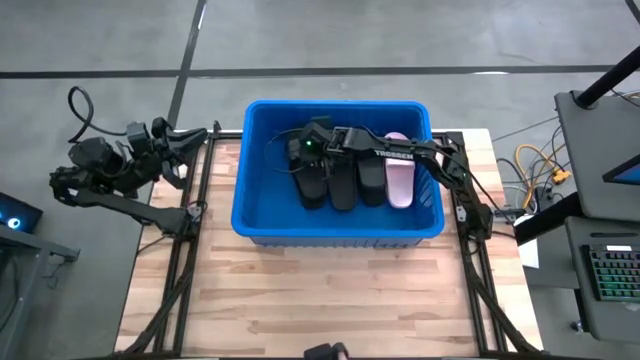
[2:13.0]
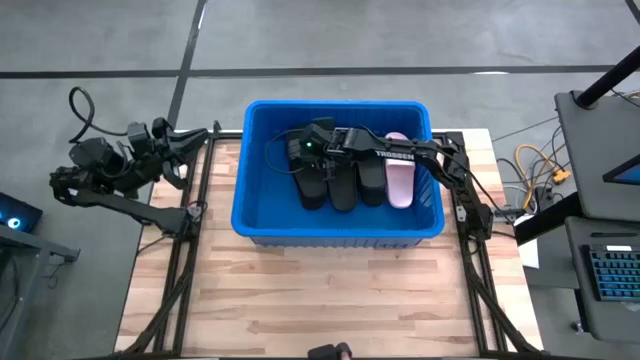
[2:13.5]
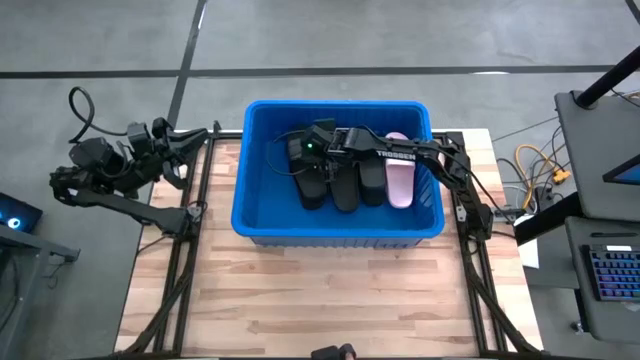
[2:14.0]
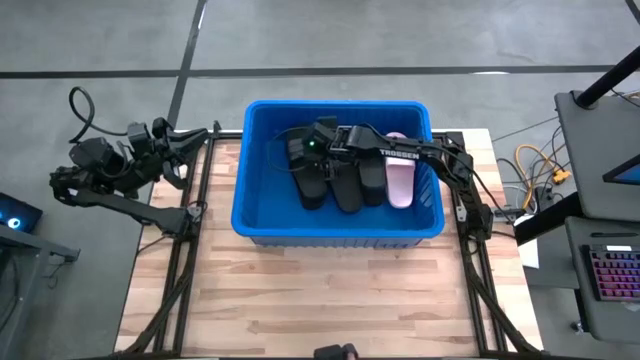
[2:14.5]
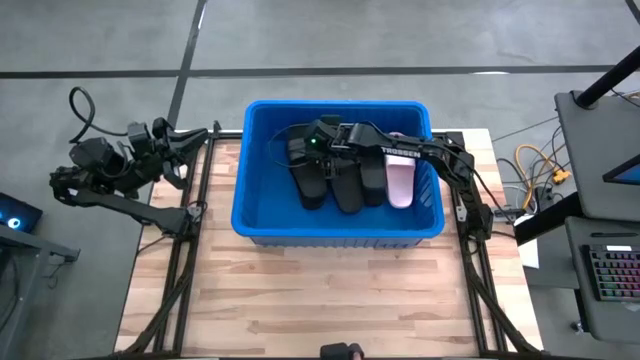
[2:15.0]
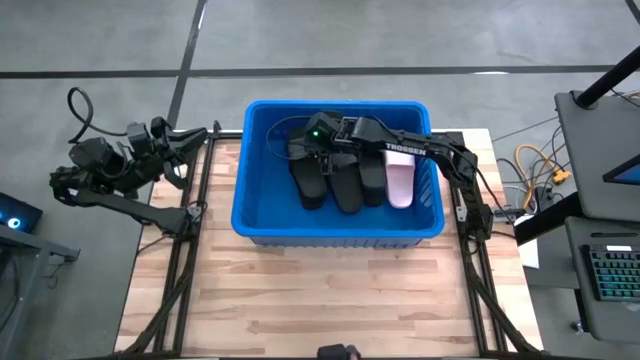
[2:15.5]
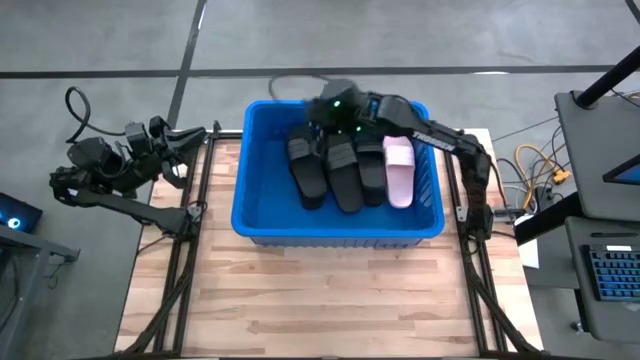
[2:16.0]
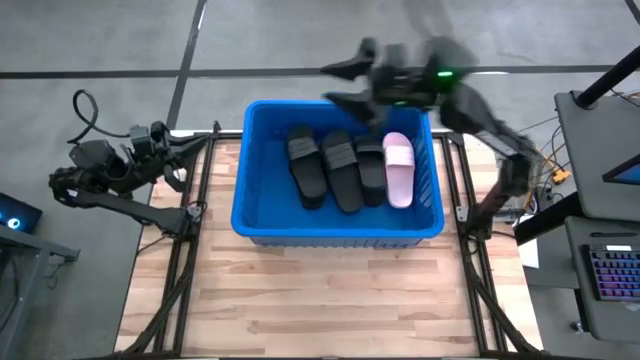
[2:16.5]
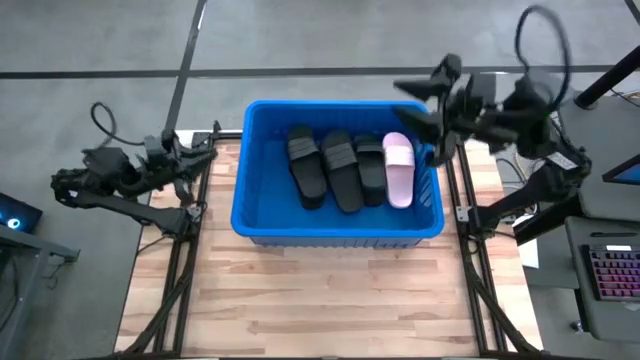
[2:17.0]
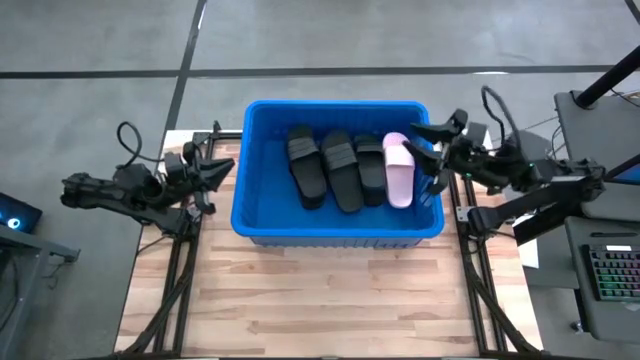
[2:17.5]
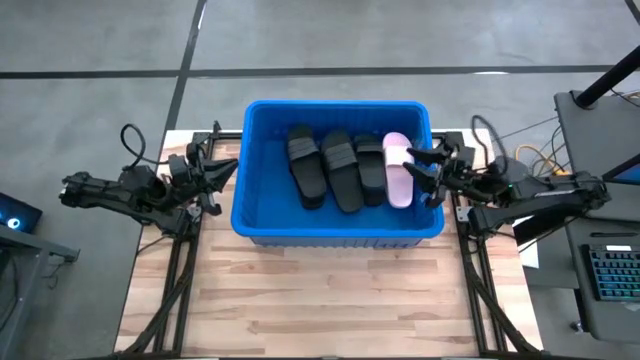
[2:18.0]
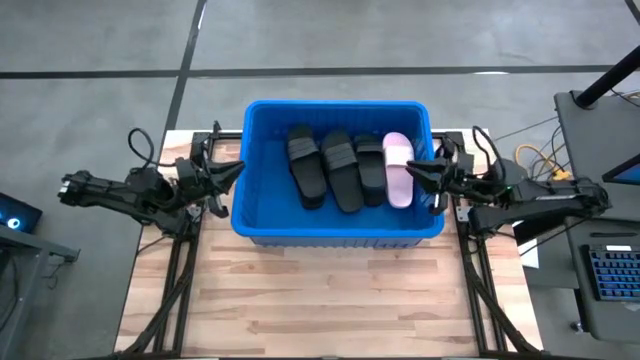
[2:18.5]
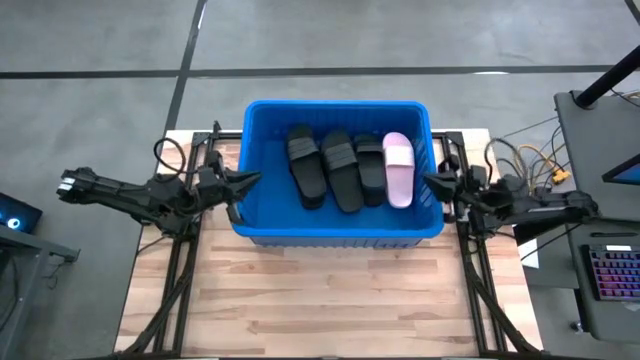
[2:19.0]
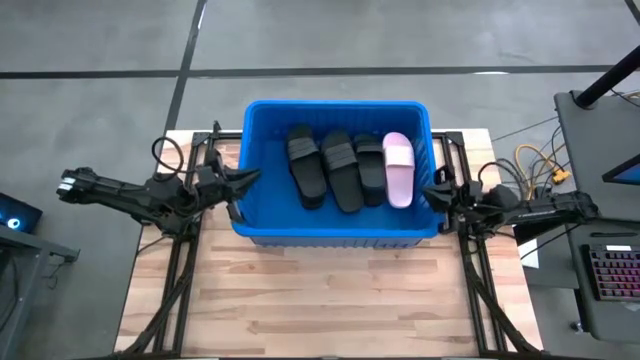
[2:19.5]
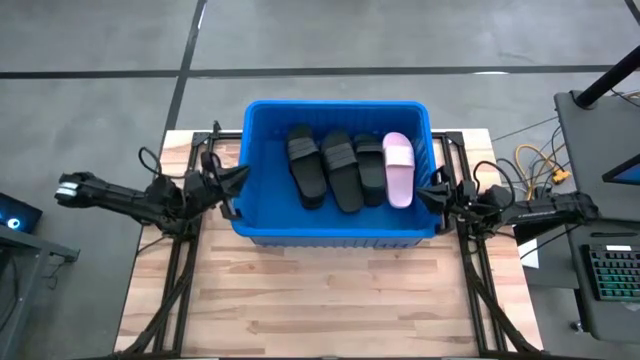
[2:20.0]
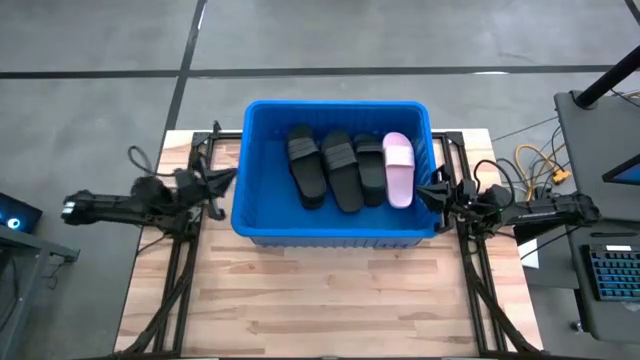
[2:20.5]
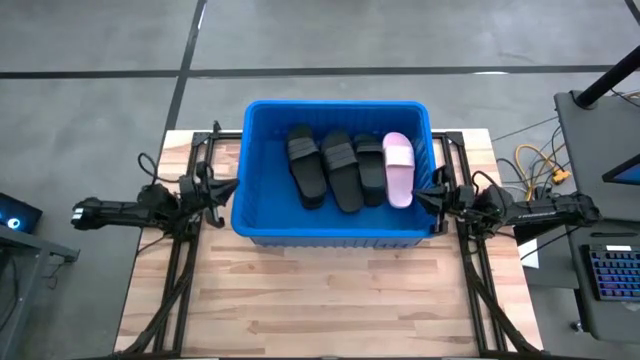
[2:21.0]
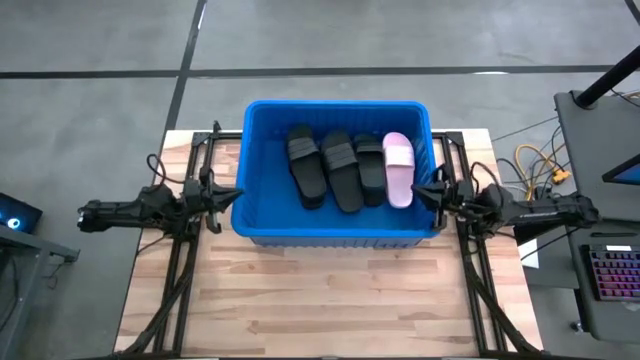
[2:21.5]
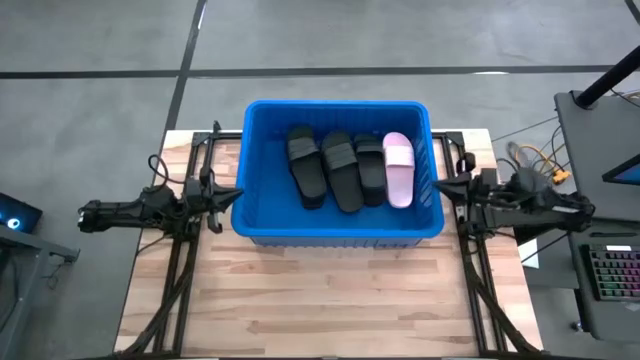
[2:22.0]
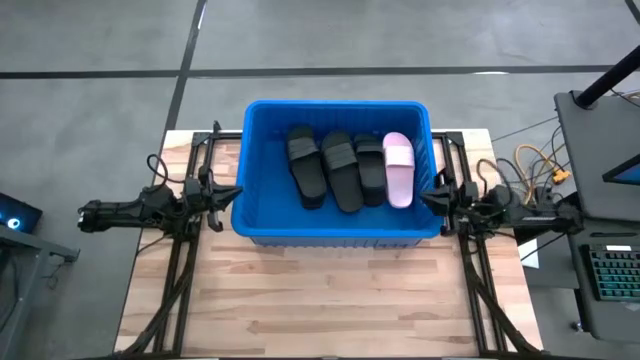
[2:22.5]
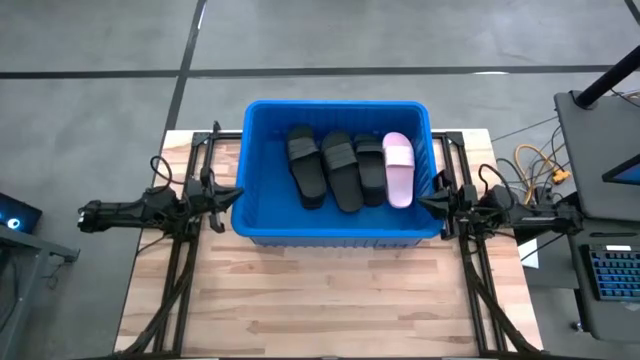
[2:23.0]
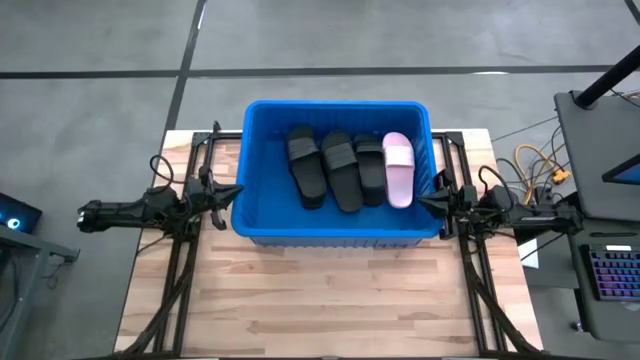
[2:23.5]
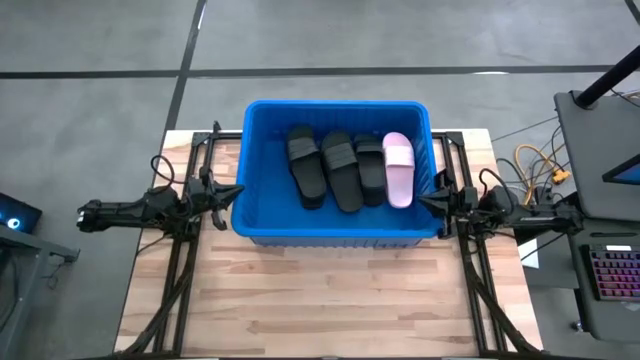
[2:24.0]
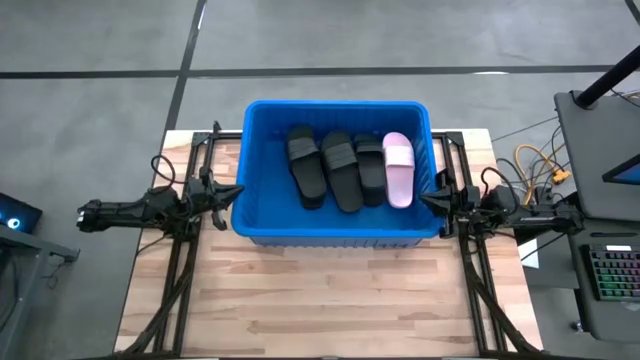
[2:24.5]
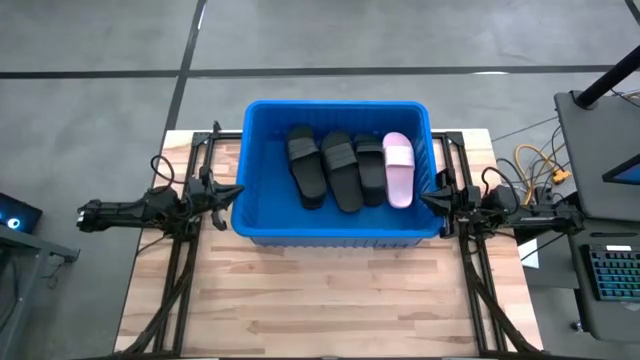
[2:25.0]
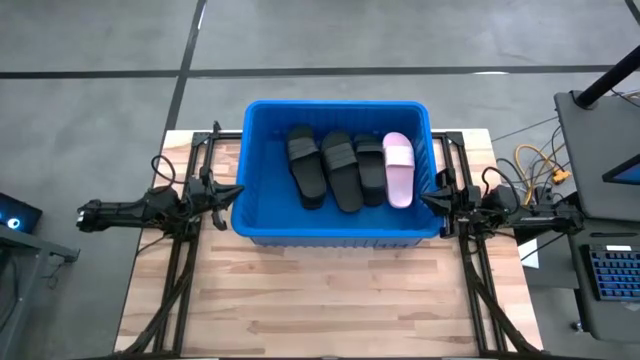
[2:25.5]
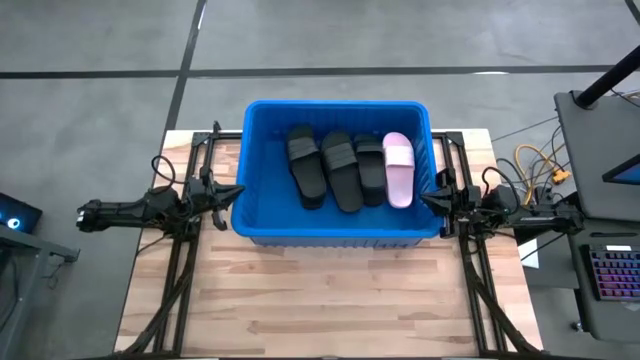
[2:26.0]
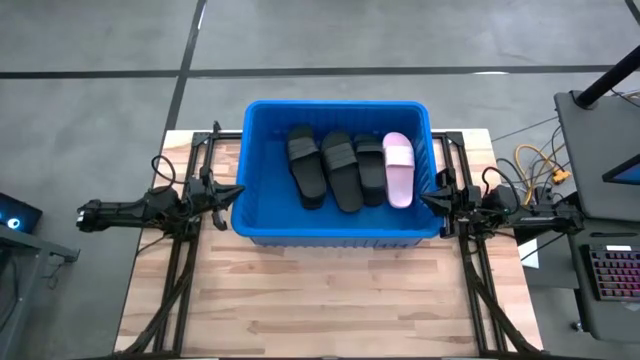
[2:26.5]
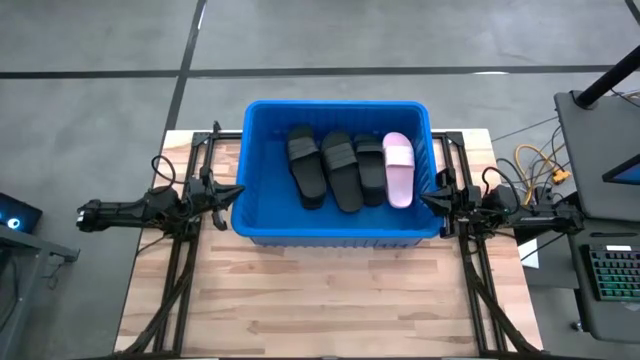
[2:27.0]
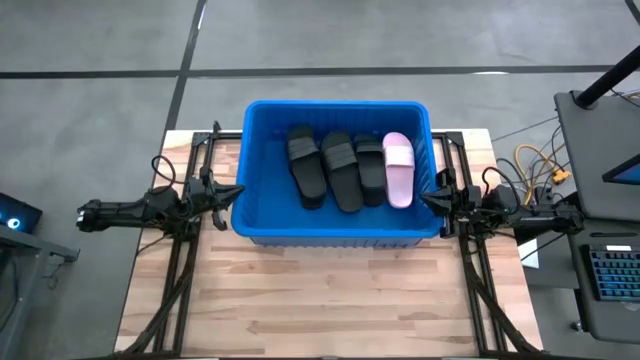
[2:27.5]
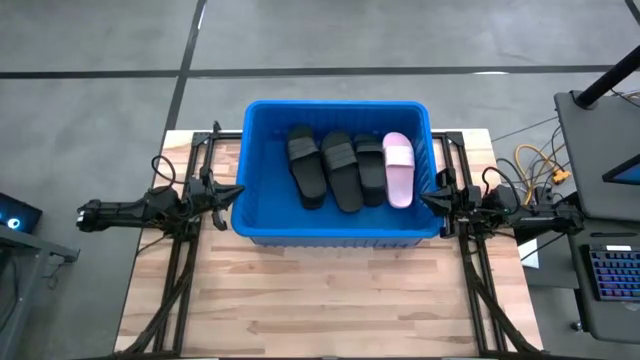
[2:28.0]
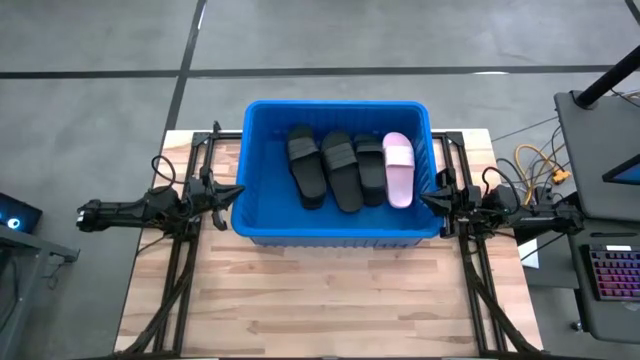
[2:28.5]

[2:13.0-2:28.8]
Task: Pick and place slides into bin
Return to Home Position

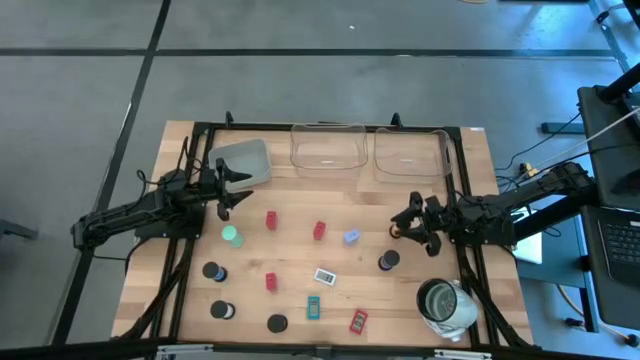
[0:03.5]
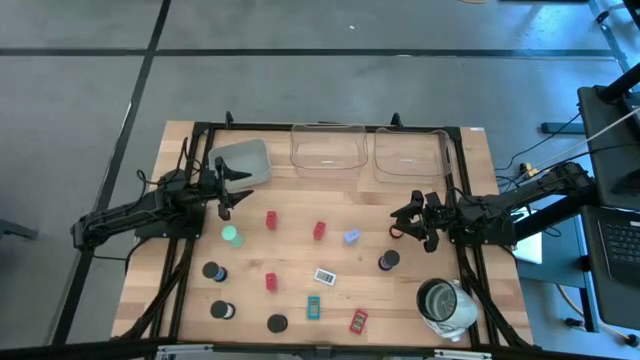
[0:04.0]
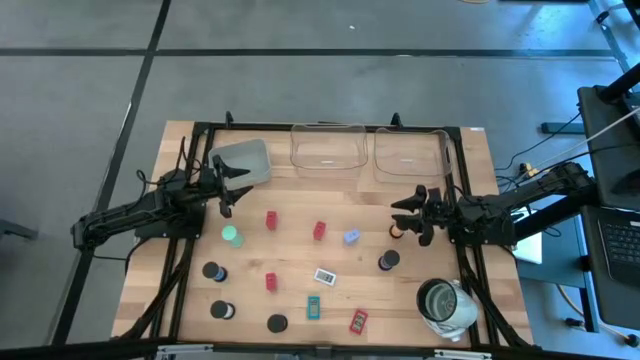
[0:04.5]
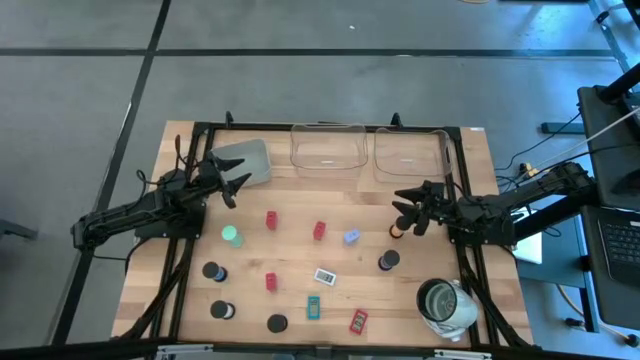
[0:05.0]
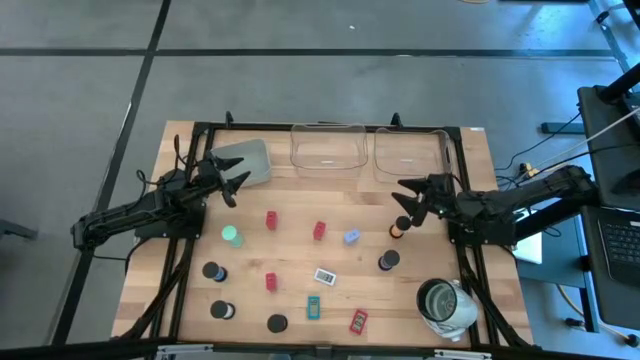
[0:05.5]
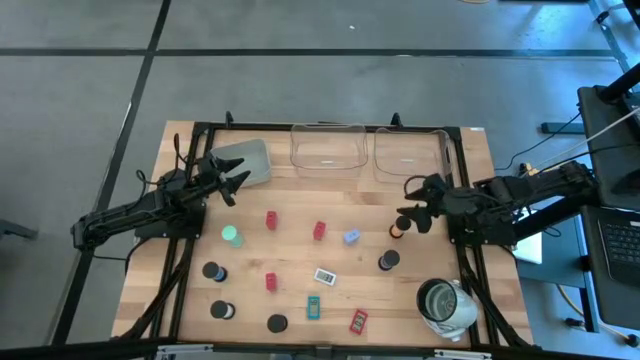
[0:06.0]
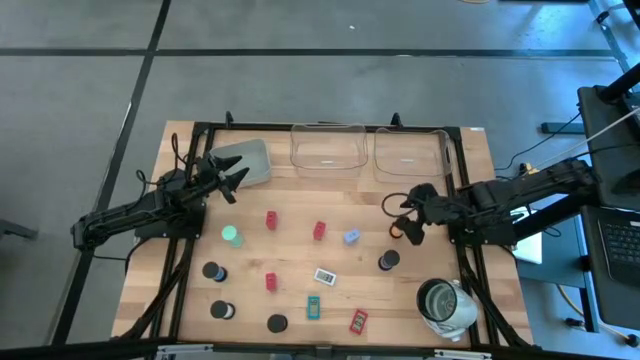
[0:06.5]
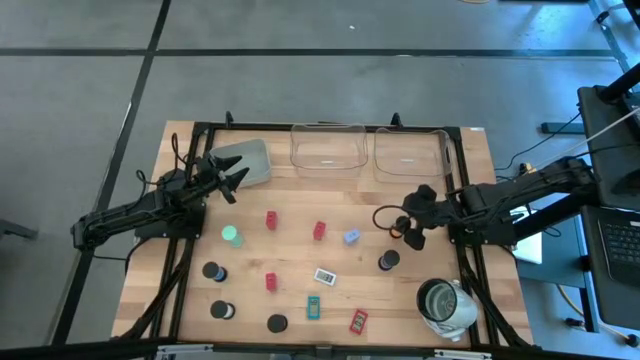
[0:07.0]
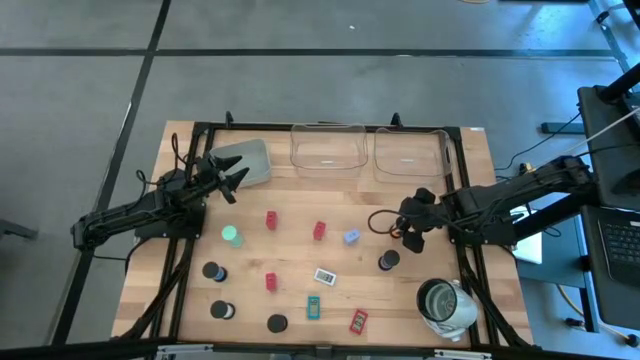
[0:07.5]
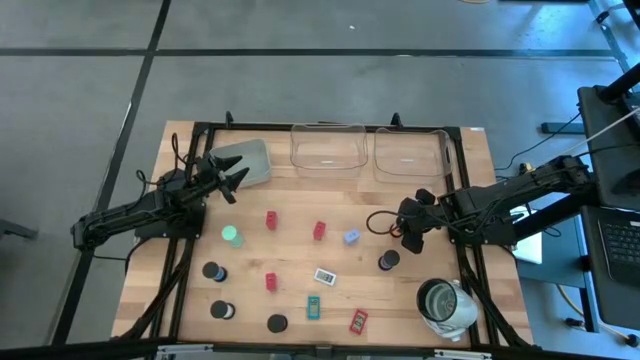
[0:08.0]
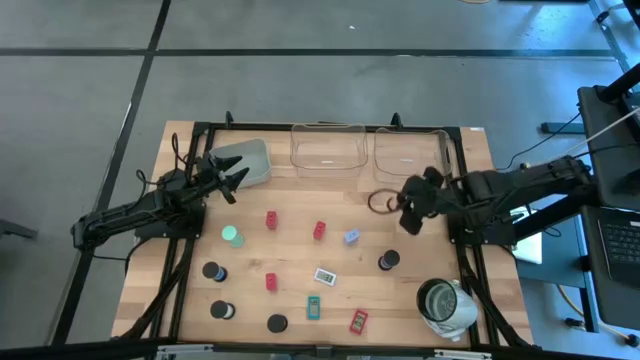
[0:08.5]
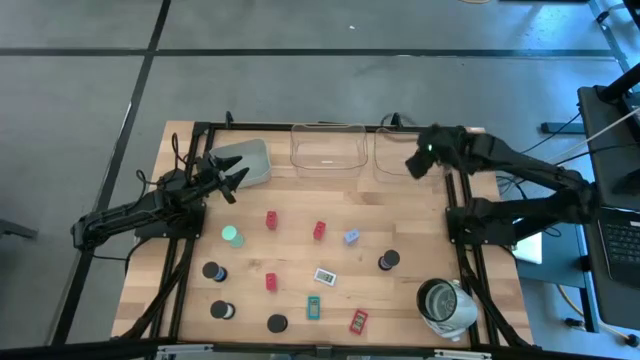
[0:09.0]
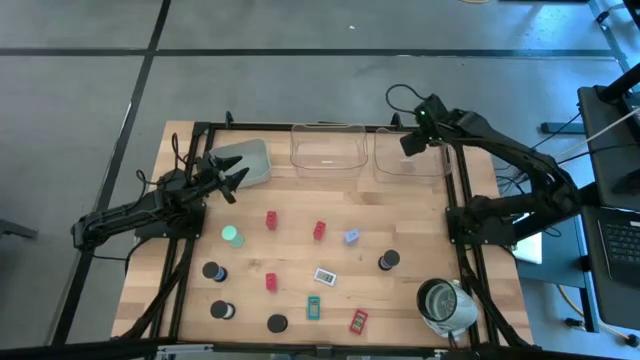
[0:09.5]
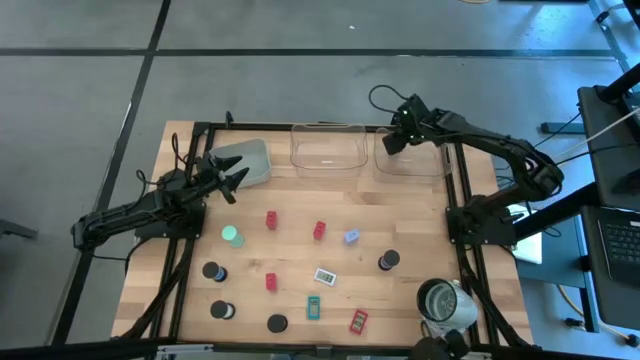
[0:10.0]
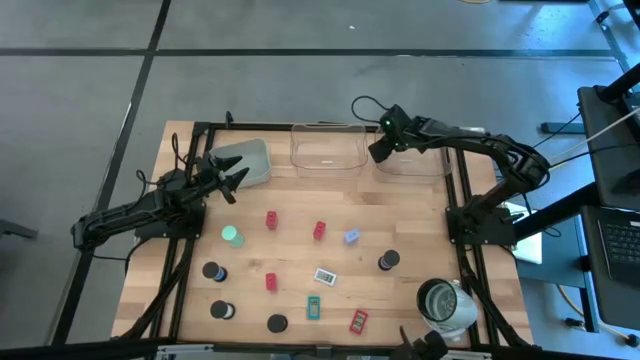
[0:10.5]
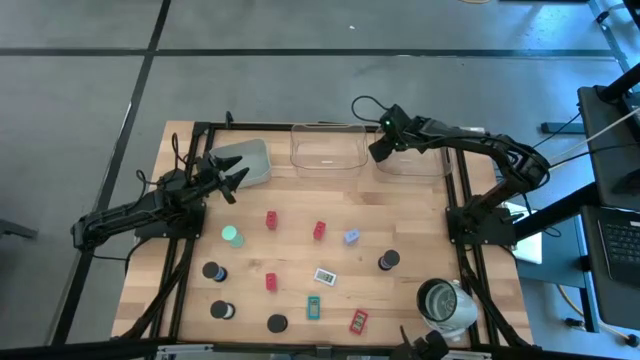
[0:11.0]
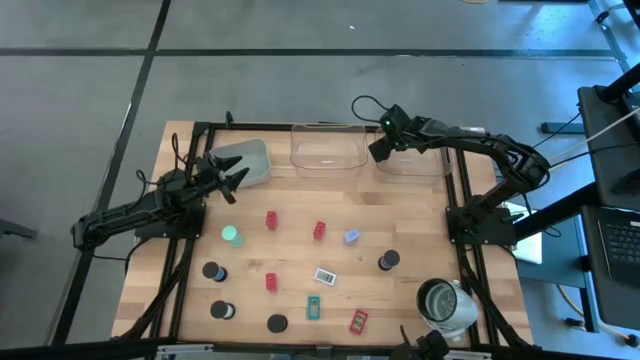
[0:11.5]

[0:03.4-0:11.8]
Task: Pick & Place Office items
Put the yellow hourglass into the right transparent bin
